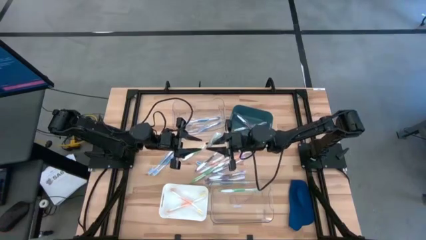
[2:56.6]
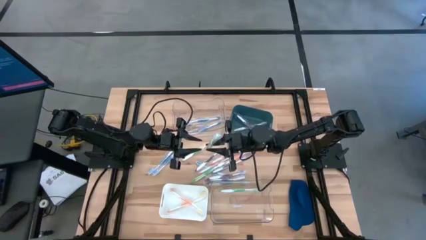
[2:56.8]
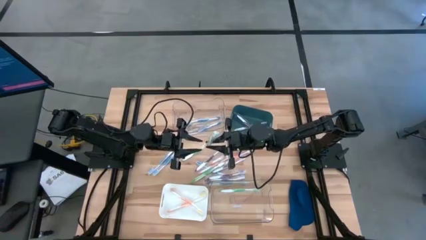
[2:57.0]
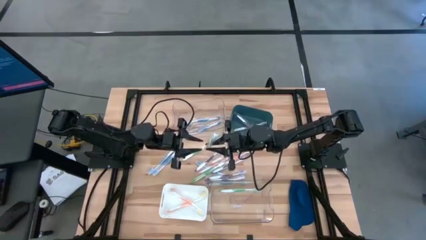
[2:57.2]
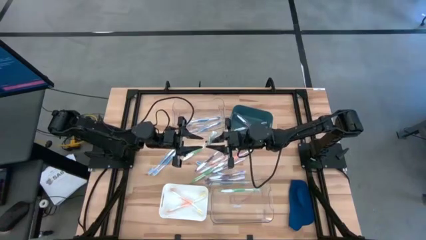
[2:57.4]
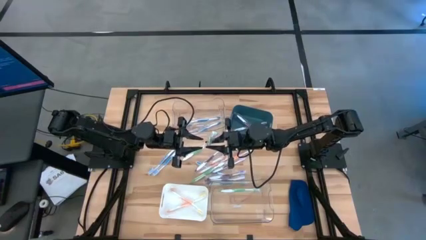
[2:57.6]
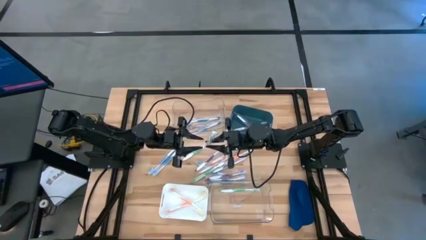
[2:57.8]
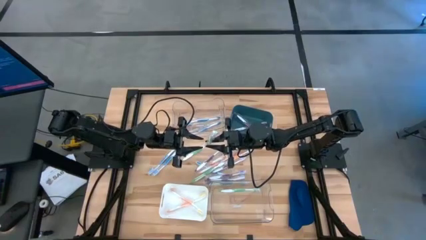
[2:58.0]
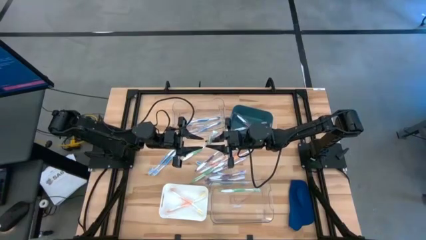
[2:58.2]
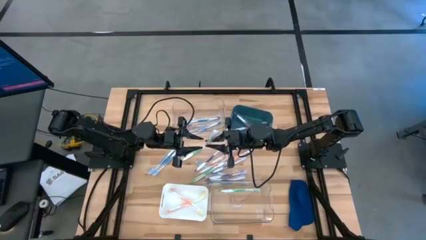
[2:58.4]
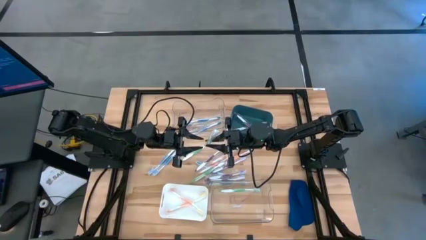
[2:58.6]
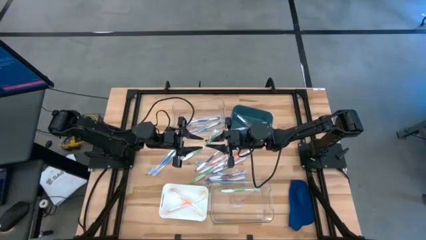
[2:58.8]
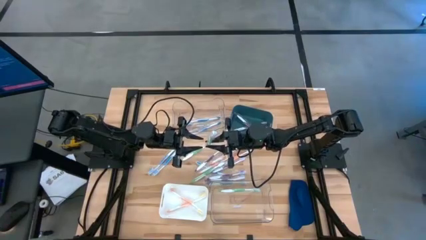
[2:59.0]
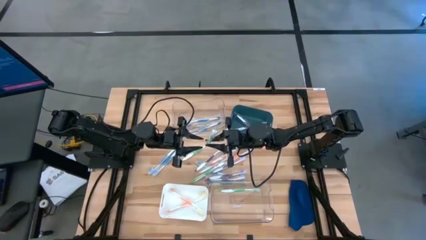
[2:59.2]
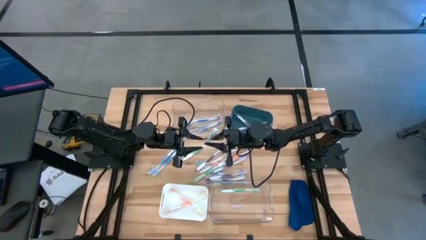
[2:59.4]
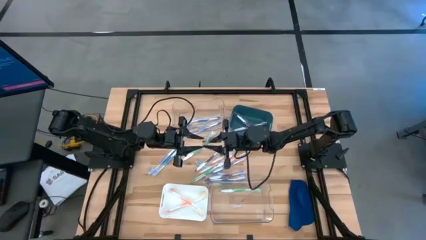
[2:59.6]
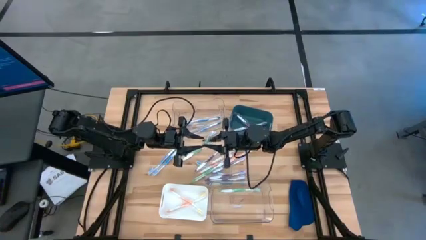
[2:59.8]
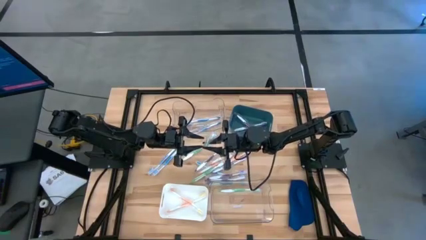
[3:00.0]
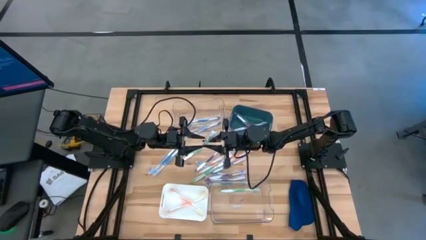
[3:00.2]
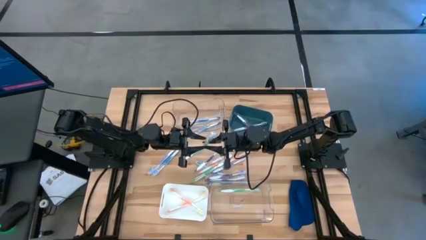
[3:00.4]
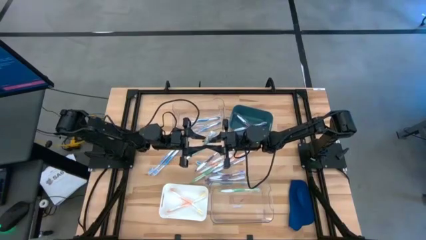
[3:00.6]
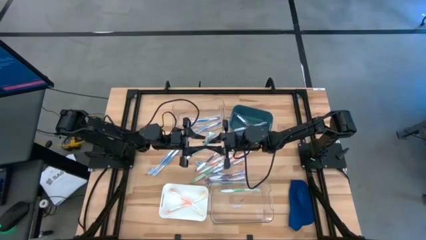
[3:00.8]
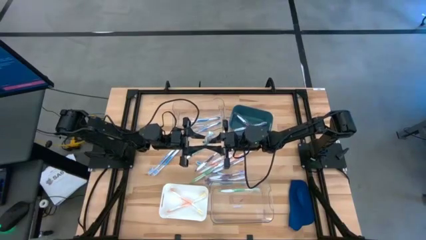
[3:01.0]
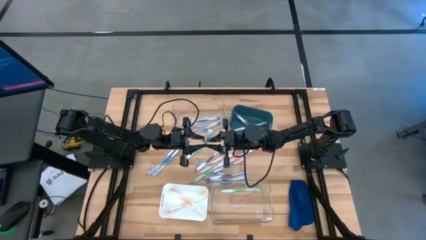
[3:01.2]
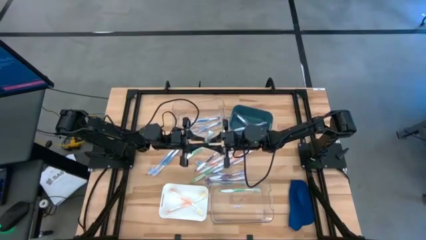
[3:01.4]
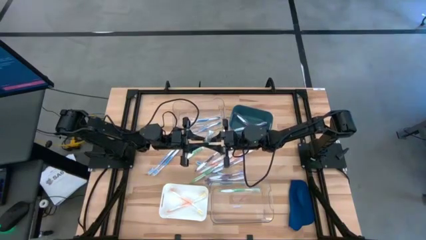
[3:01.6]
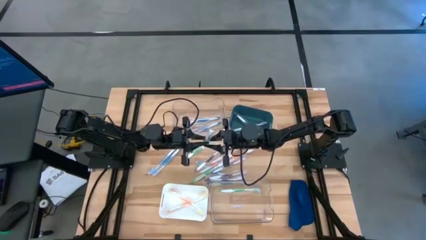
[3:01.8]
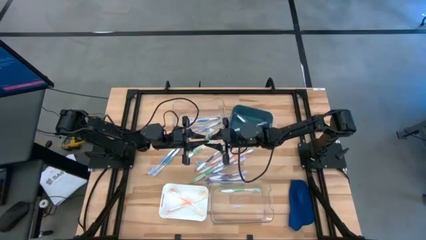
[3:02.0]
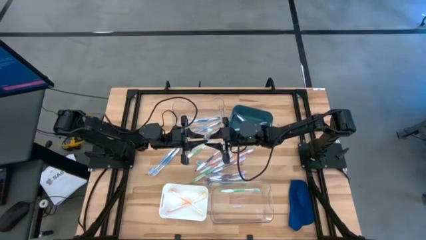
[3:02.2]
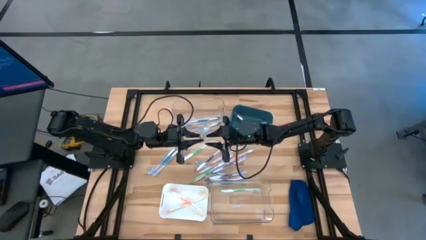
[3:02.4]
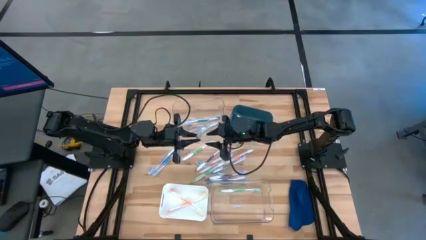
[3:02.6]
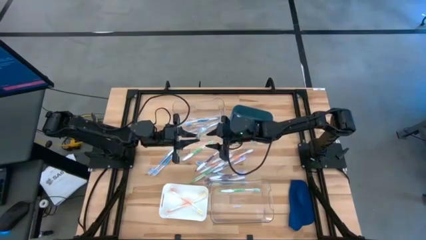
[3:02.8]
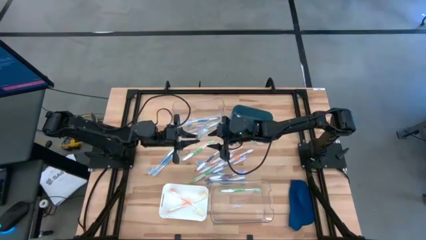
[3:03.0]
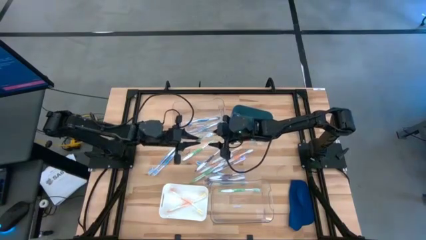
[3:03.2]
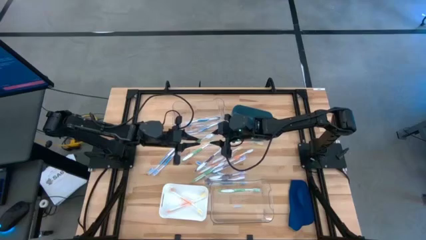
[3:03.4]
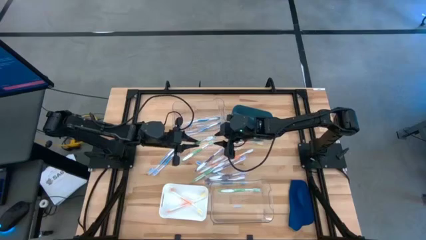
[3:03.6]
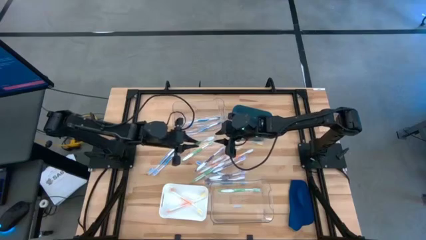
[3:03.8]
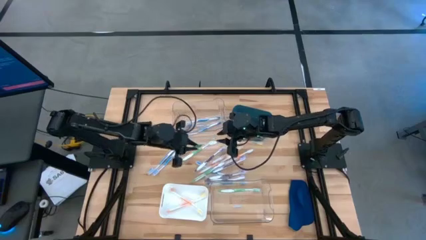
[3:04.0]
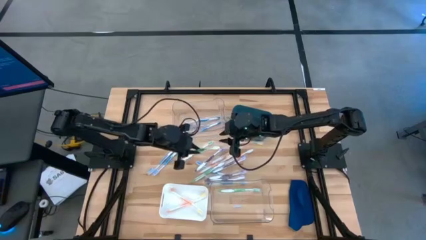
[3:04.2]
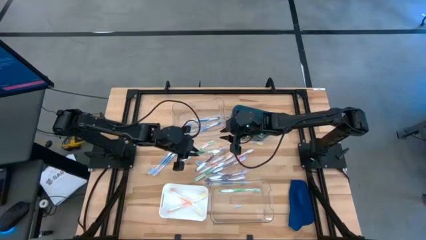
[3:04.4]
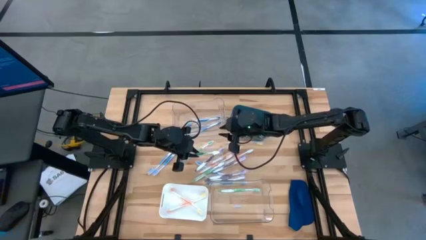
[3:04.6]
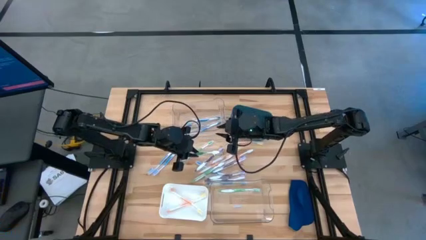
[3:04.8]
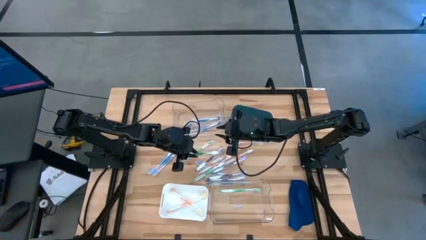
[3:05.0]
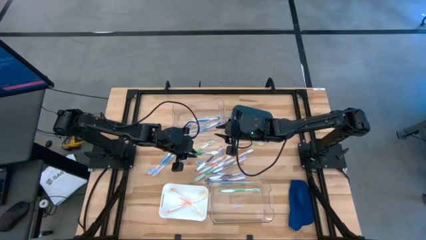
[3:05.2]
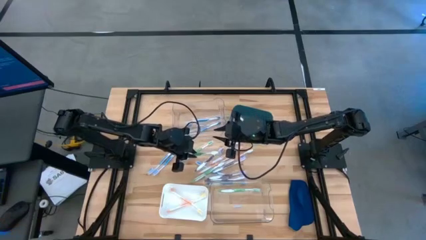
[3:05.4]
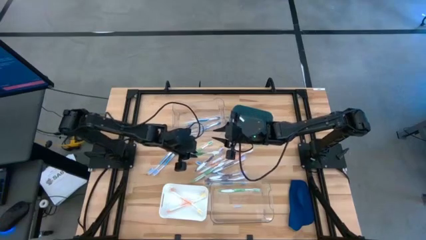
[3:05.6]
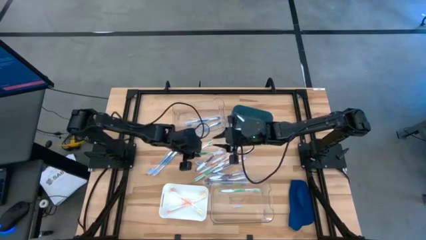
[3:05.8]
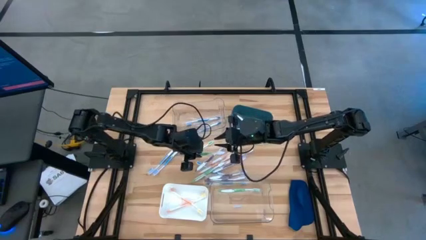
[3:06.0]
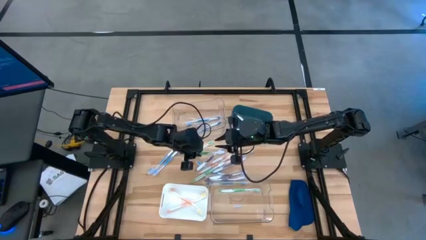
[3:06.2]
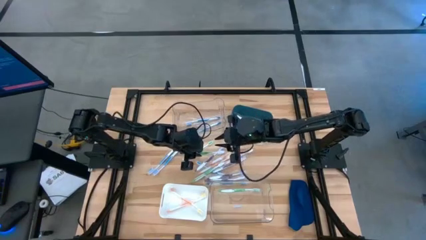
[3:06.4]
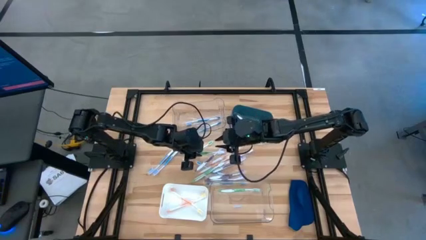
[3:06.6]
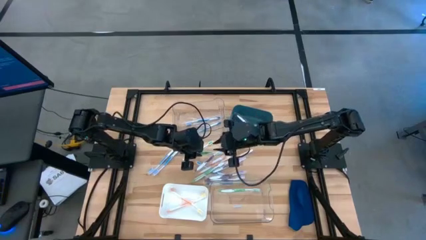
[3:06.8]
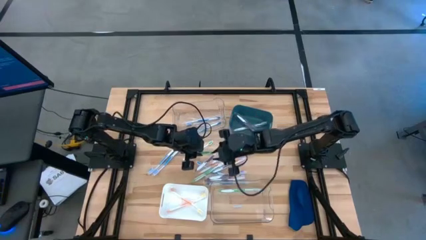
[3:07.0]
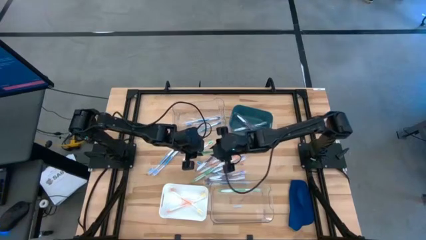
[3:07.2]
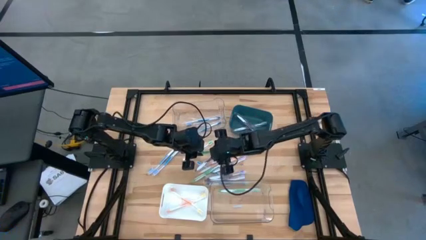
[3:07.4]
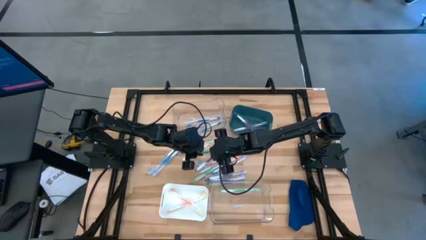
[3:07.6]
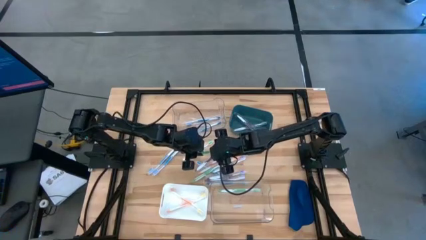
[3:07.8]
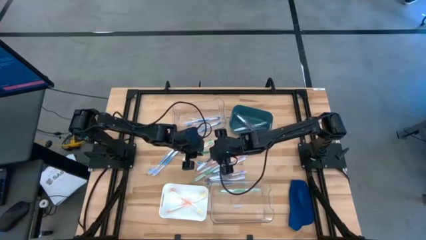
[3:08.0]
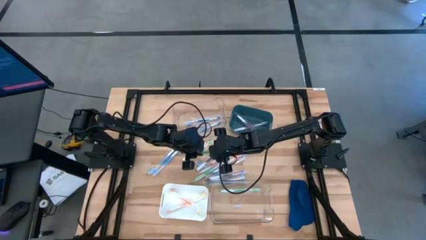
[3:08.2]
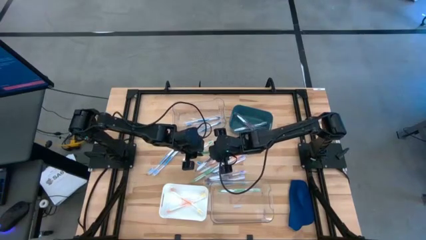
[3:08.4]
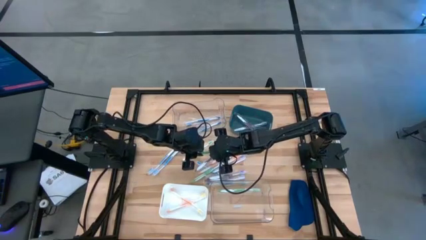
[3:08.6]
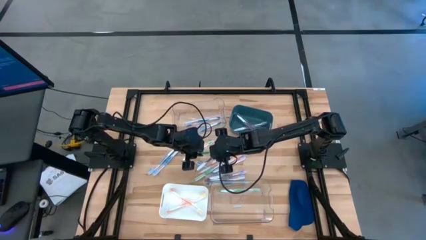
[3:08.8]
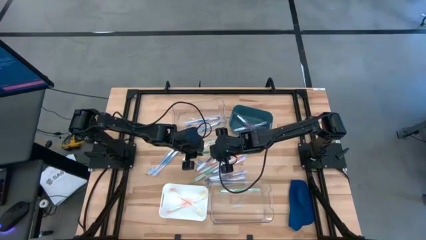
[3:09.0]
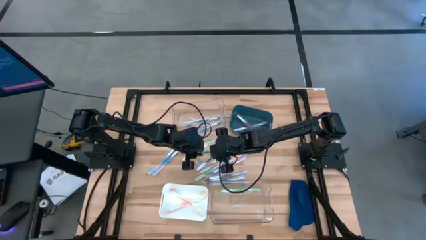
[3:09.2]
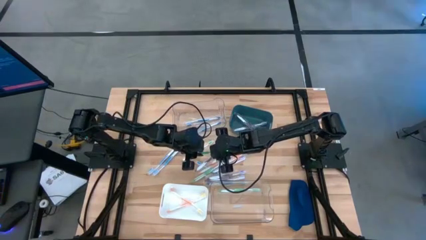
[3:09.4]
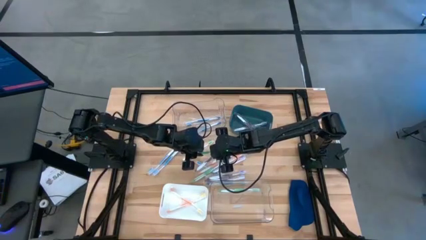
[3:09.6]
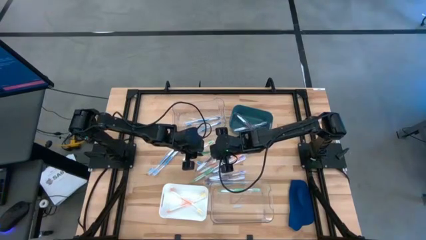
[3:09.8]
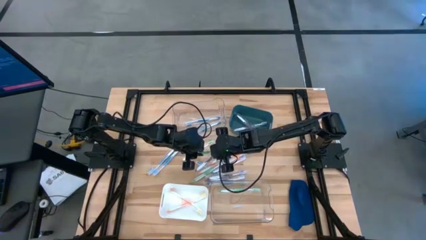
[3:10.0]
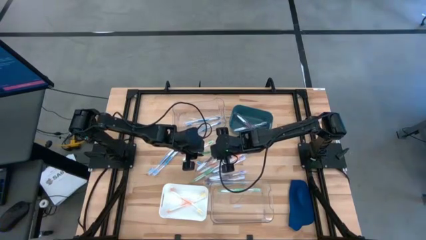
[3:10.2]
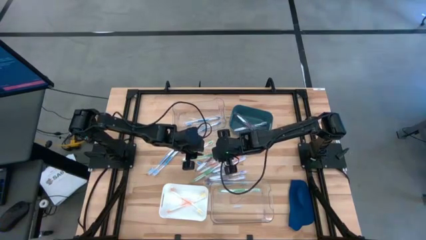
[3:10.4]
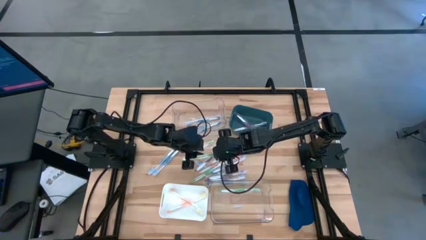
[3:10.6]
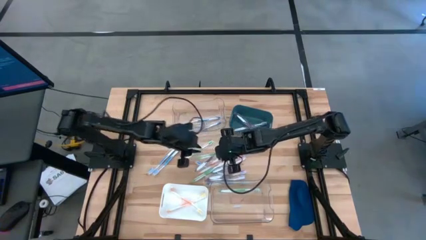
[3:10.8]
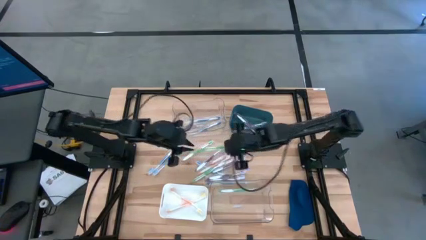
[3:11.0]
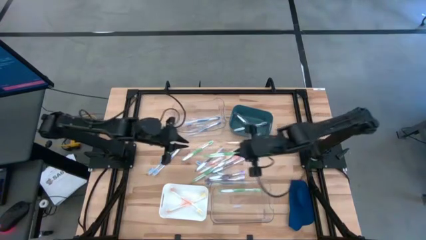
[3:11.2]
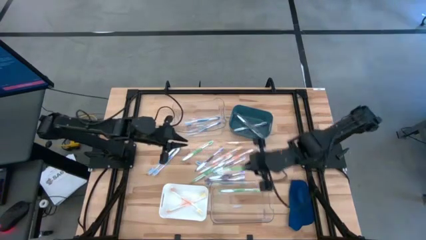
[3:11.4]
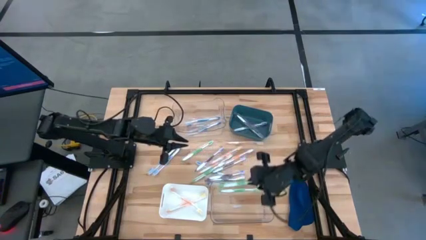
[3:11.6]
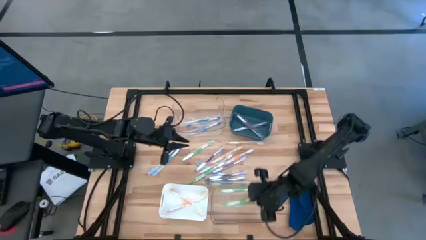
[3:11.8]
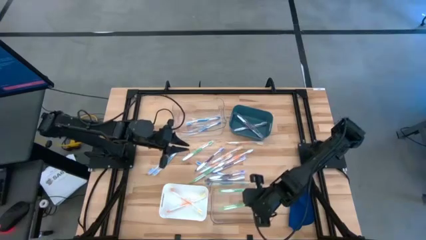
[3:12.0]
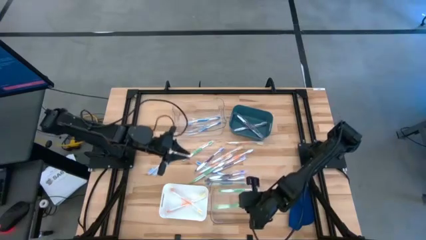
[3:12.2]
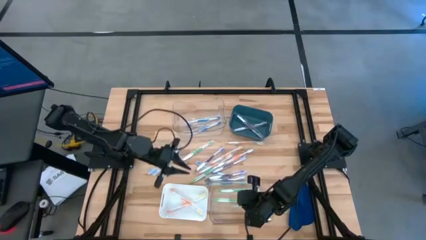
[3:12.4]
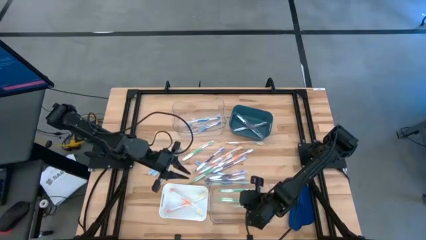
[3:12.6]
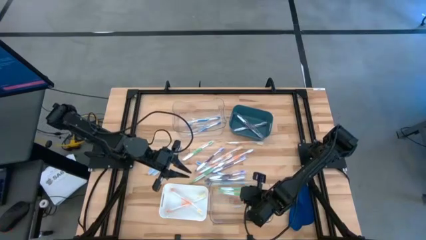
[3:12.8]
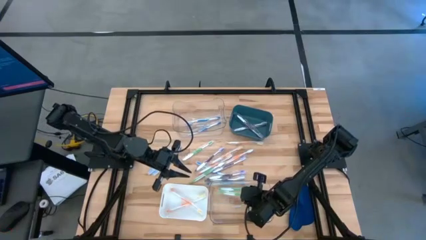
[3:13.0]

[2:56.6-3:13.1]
Task: Pick & Place Toothbrushes
Put the green toothbrush into the bottom transparent bin
